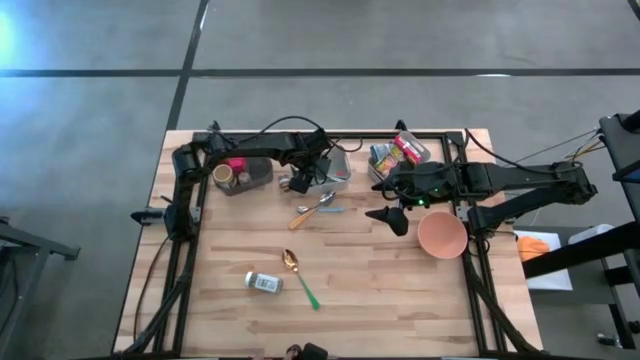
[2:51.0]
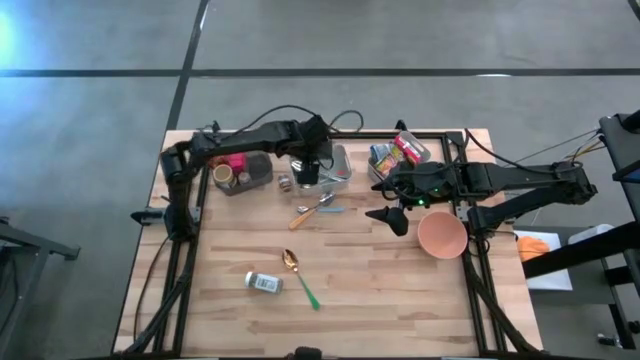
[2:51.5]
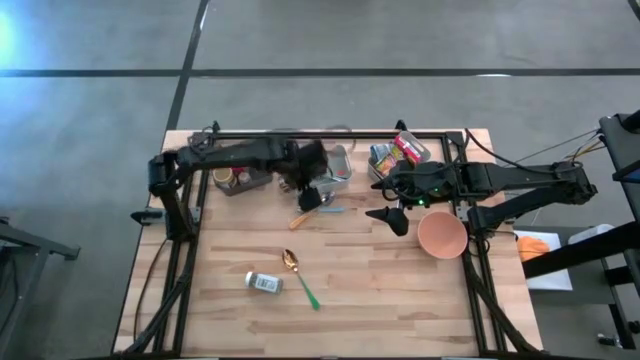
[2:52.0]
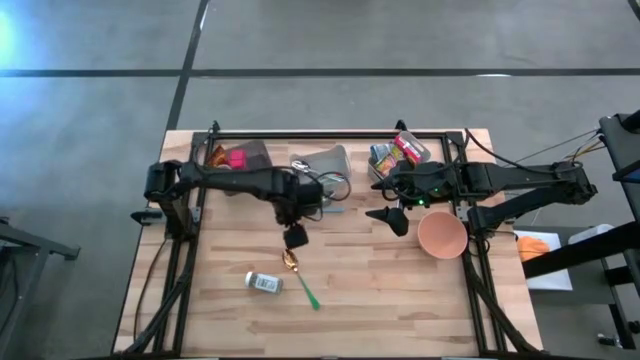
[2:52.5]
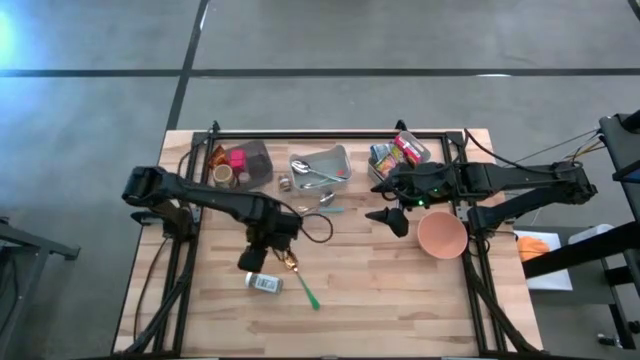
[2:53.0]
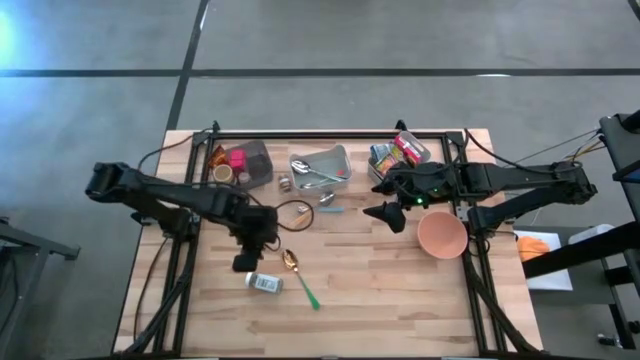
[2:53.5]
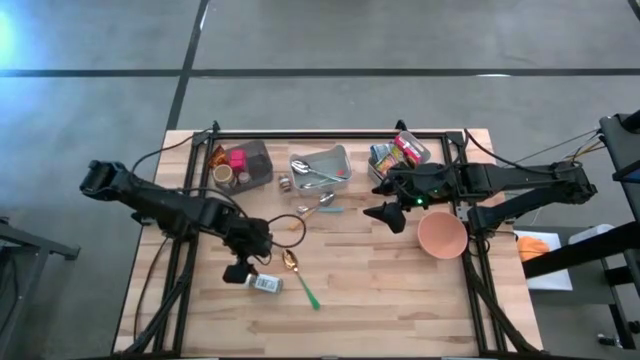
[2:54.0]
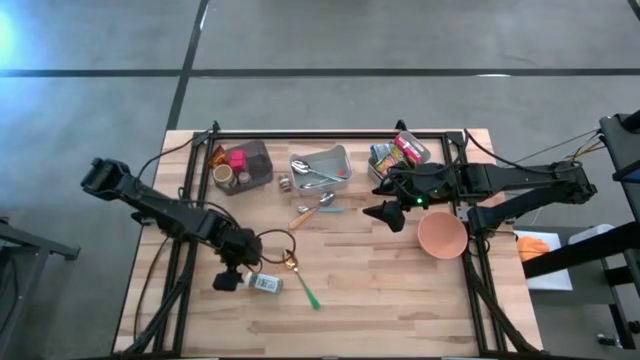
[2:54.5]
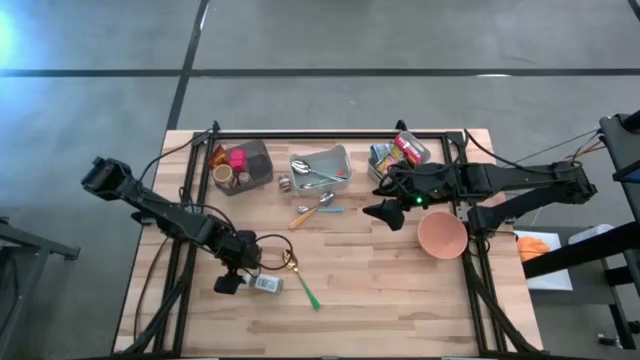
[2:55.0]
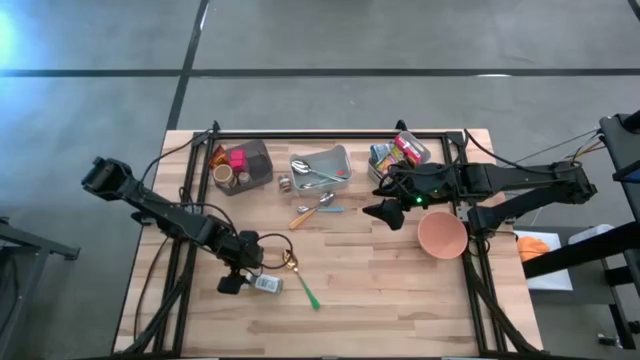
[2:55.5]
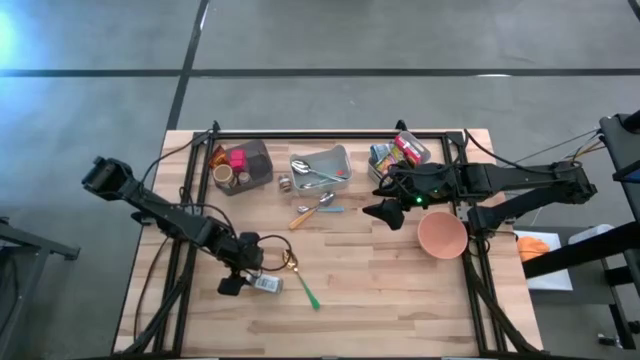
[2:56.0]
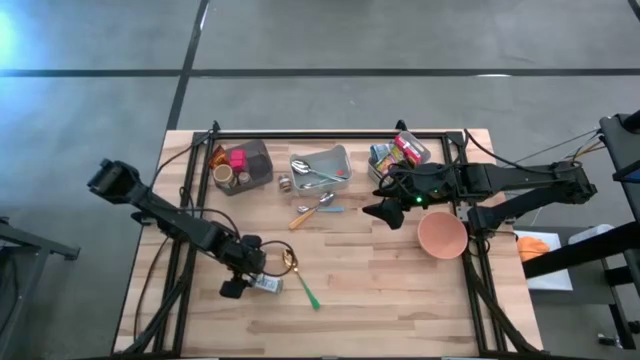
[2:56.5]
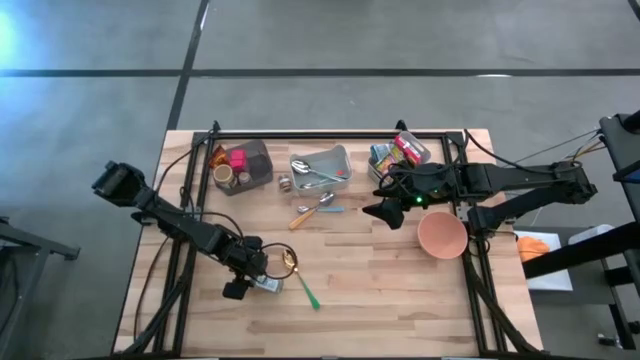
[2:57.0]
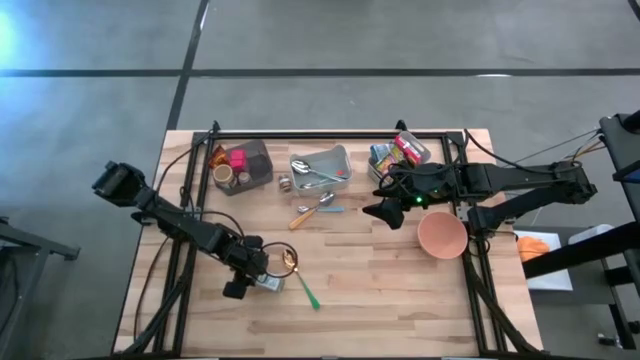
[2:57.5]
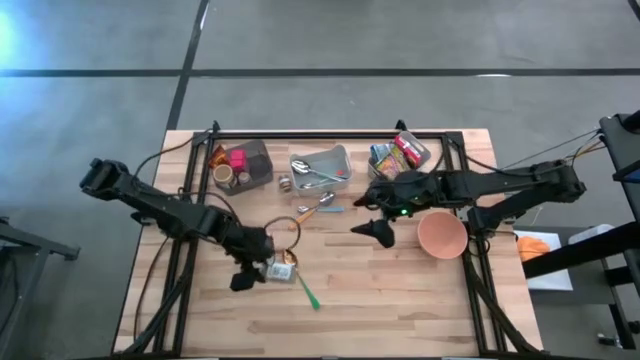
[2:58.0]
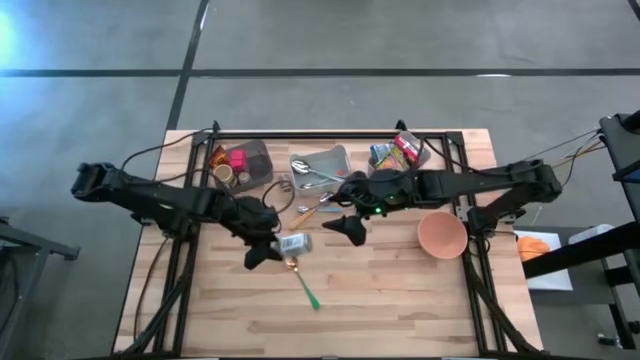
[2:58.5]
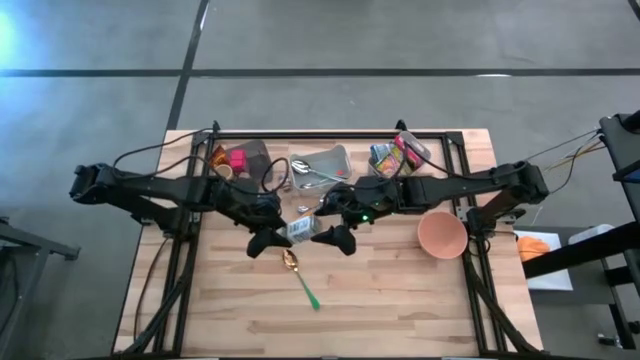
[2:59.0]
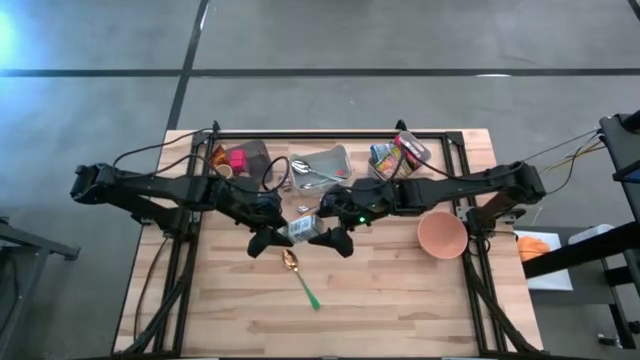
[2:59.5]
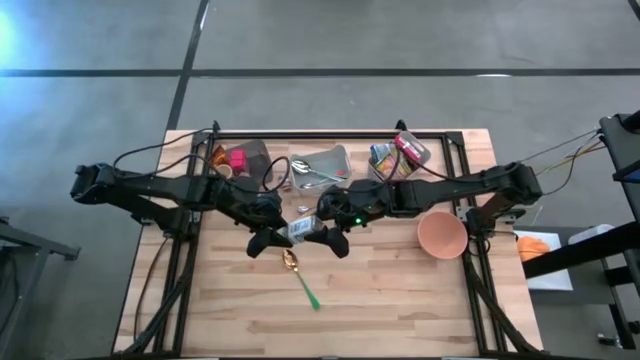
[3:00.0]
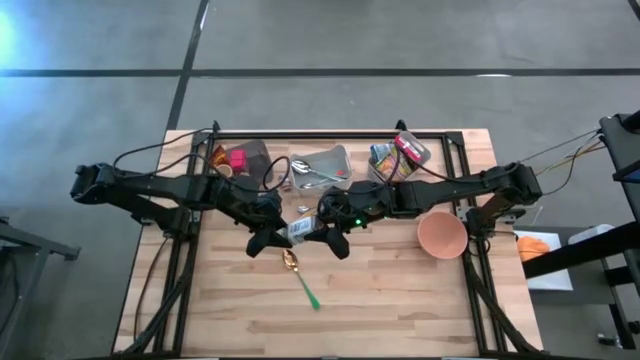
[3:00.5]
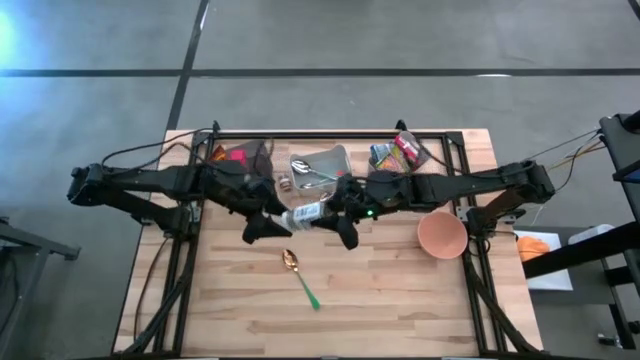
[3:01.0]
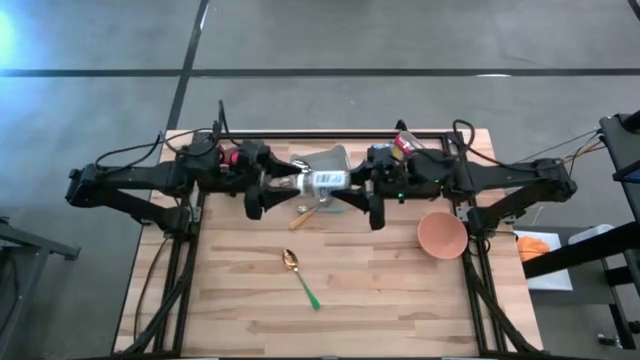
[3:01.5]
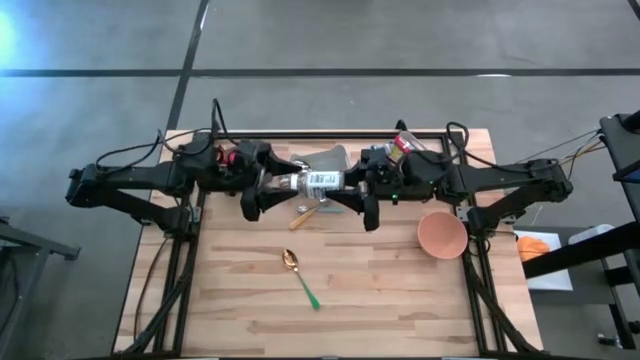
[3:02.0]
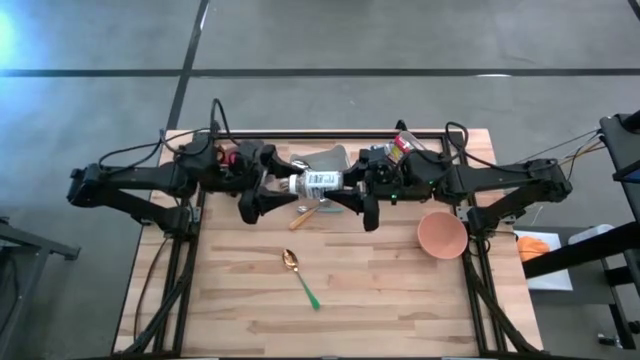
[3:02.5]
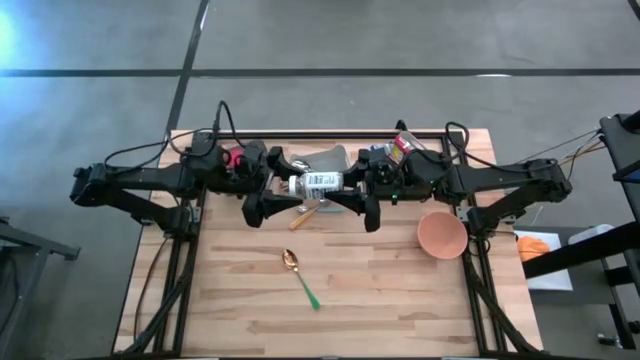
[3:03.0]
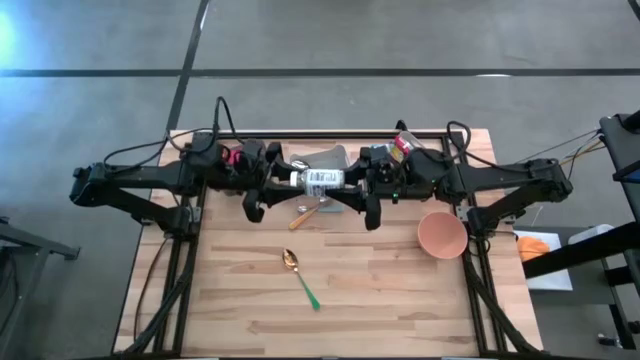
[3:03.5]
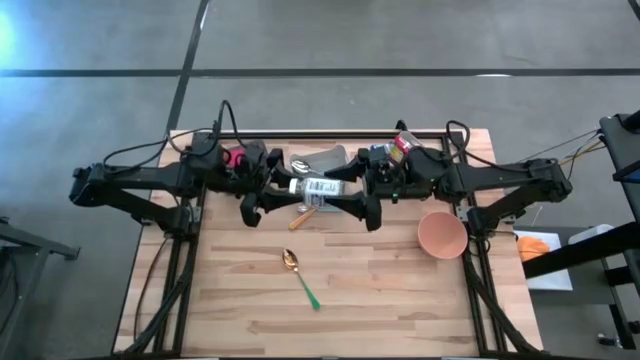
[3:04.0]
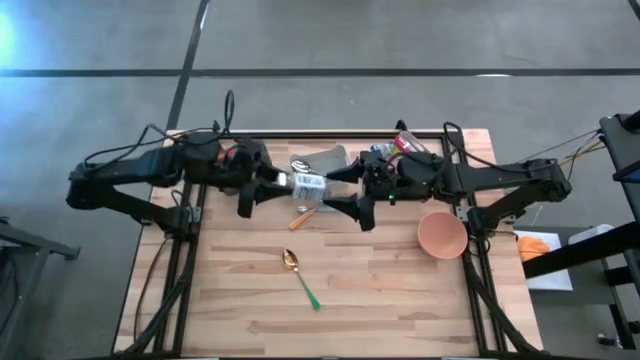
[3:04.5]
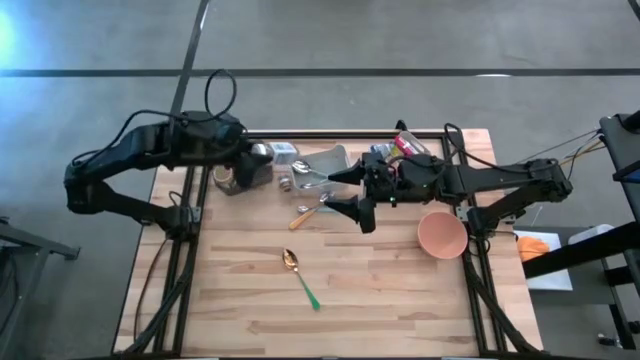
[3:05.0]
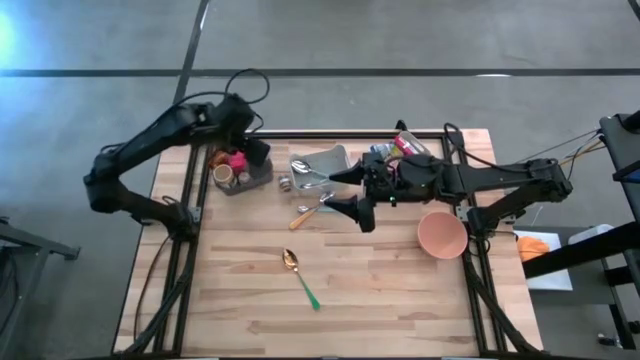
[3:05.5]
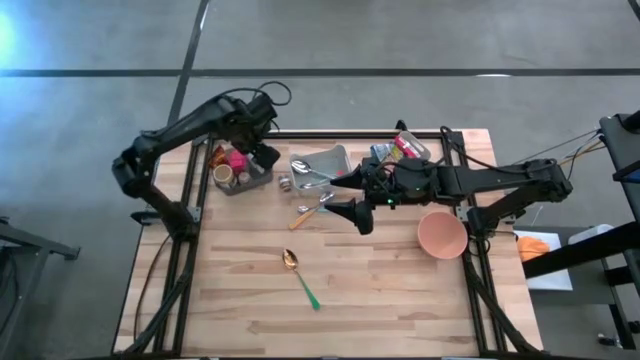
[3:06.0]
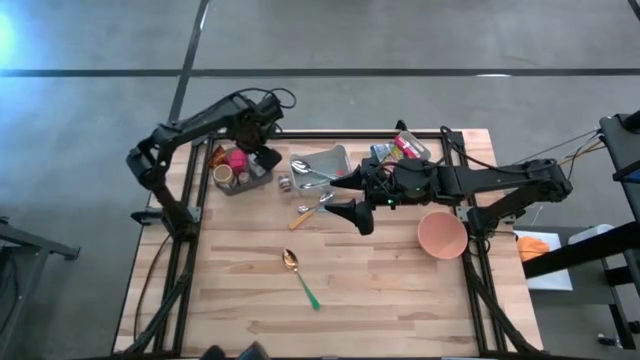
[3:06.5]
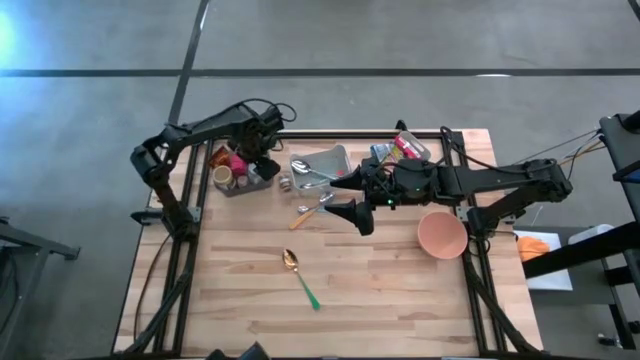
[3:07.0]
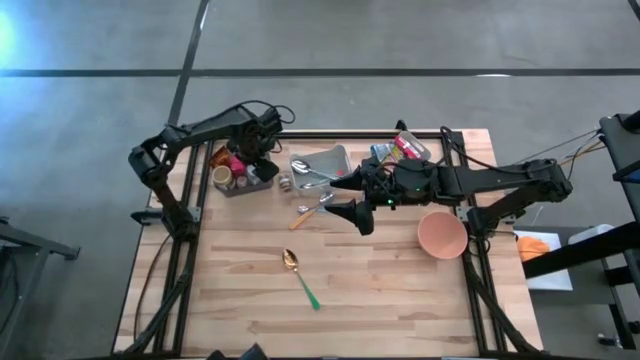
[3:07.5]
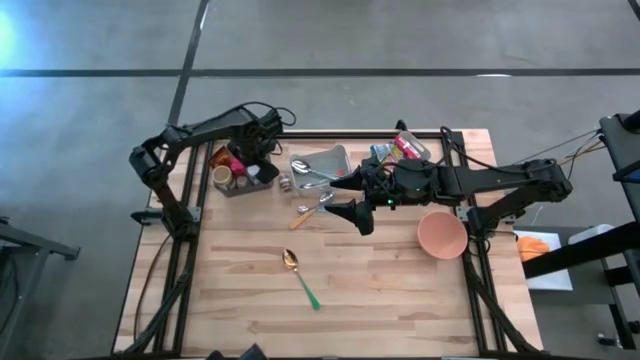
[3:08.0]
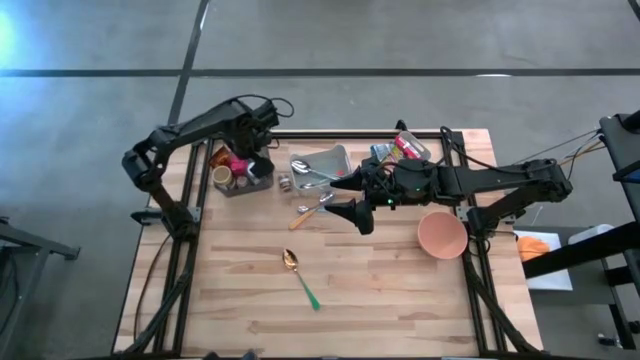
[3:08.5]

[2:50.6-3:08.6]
Put the white seasoning bottle into the black bin
